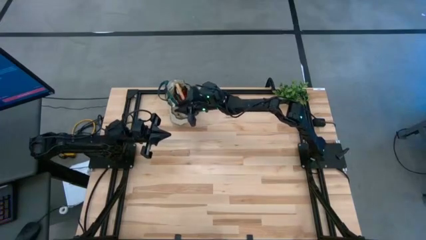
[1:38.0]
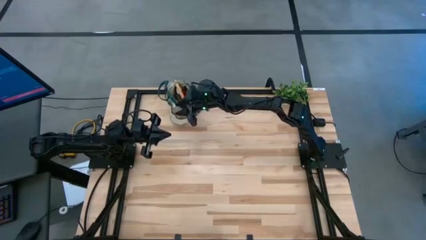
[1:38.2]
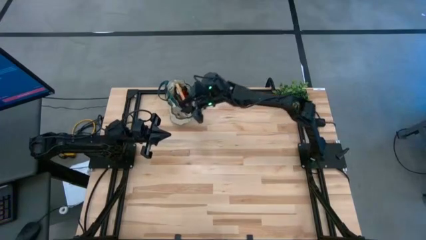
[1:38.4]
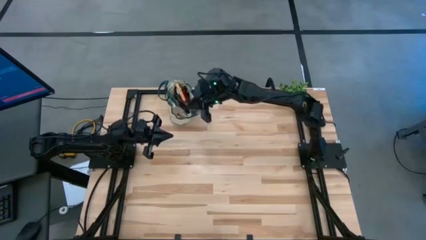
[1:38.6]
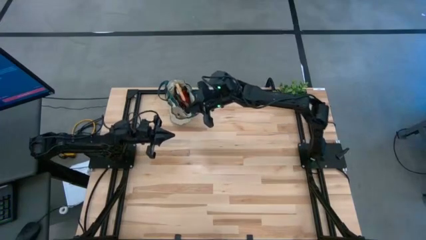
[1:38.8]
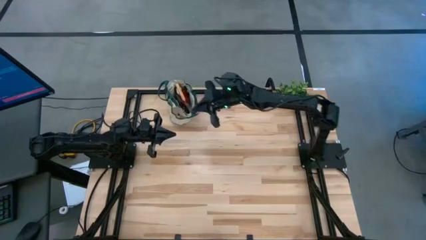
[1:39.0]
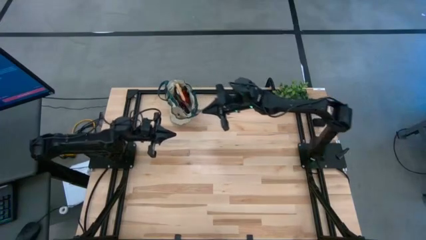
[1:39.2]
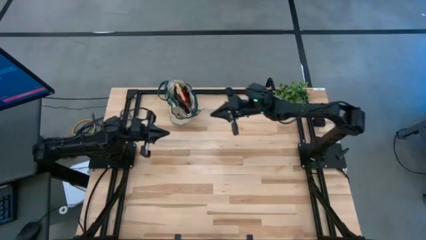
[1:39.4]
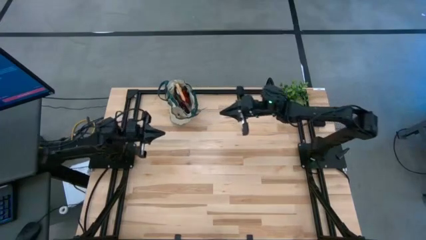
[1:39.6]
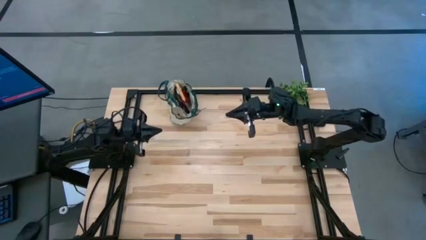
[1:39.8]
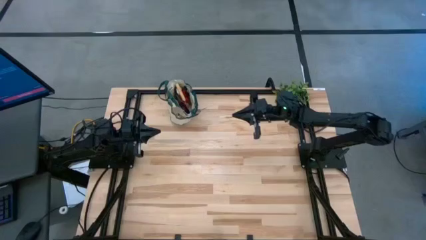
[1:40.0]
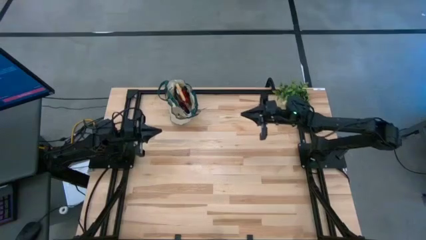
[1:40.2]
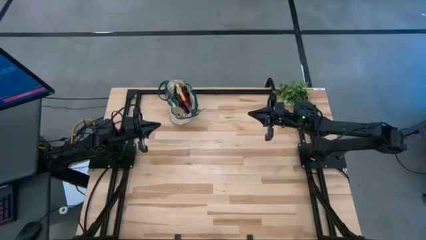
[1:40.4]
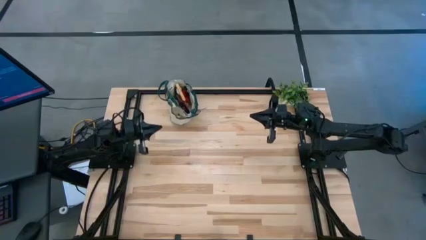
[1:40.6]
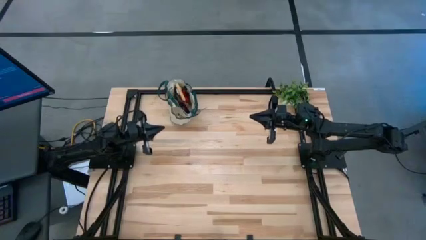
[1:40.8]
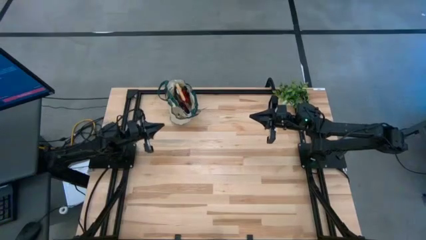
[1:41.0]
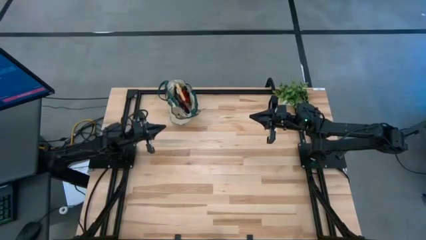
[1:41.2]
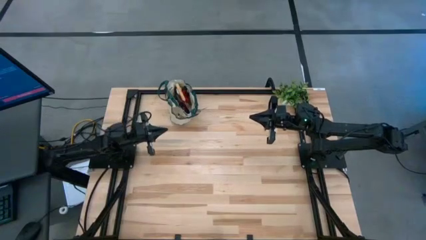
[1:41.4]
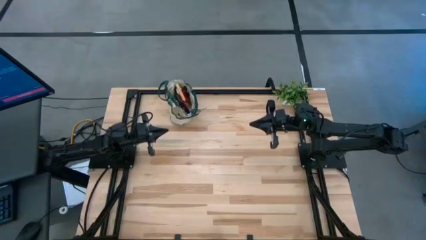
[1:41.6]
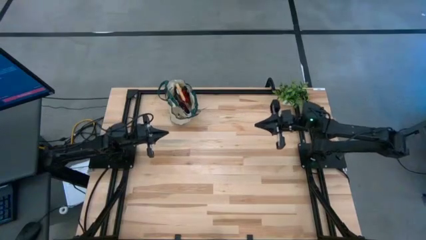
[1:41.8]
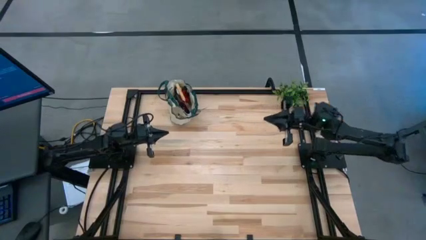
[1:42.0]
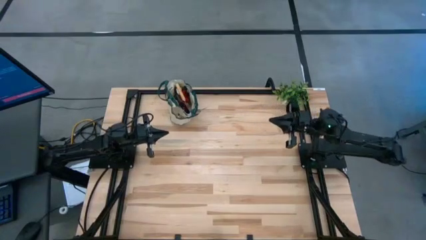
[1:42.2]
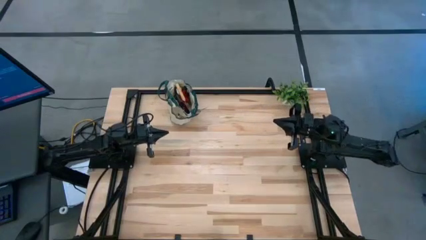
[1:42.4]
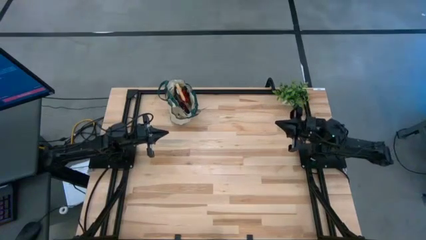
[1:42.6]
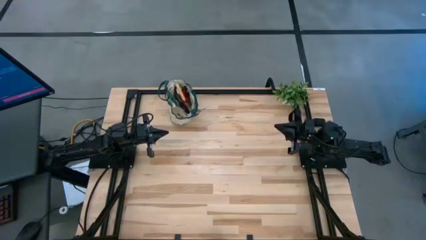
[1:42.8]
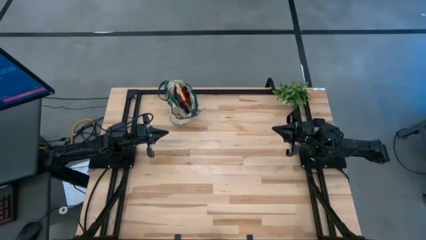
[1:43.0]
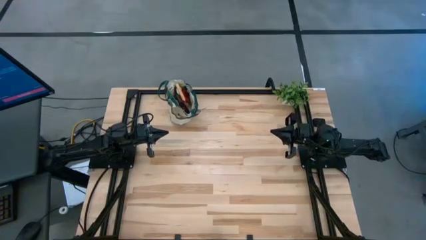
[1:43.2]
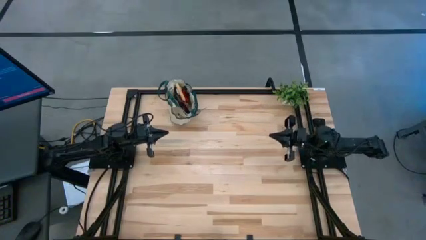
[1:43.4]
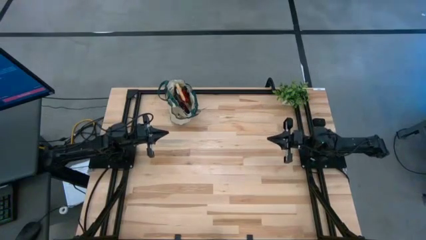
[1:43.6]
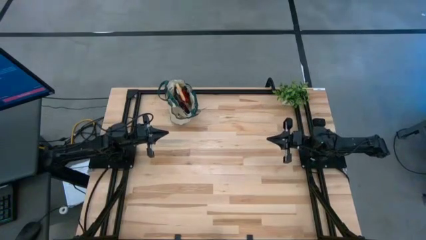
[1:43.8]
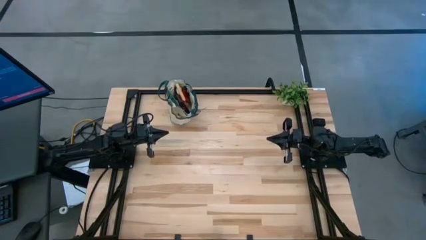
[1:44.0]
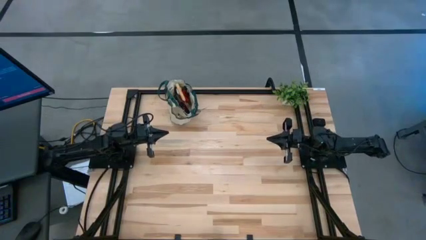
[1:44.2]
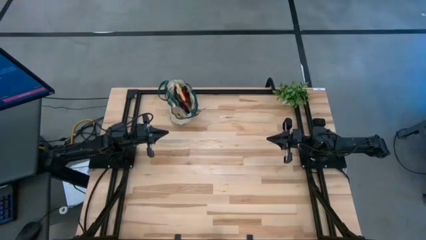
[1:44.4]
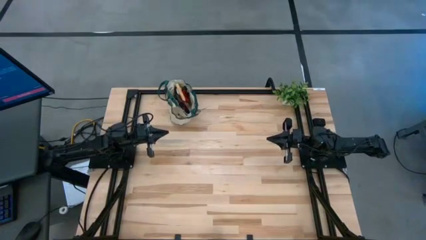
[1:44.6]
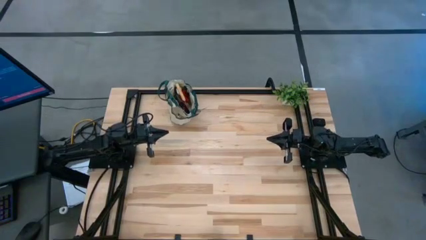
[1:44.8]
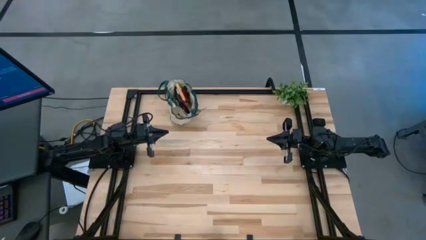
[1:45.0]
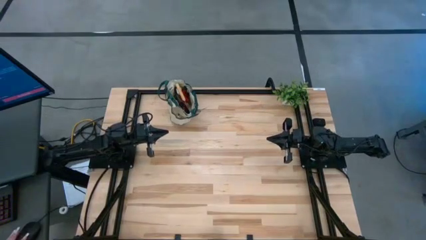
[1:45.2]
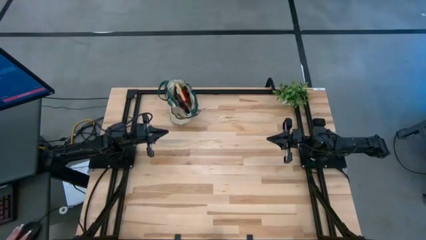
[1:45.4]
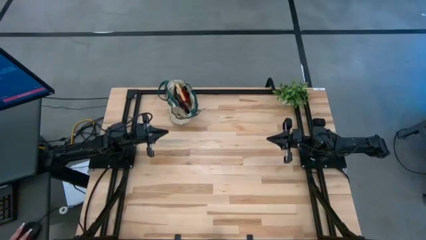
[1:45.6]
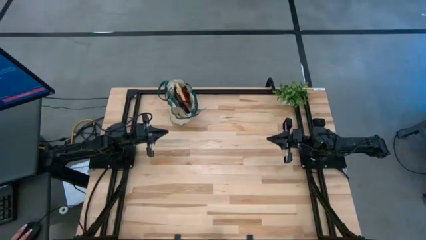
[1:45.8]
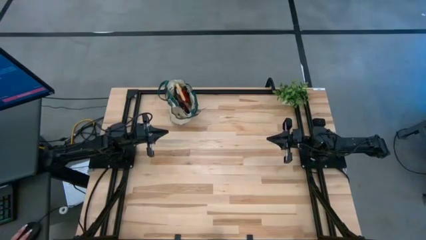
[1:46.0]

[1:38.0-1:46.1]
Task: Pick & Place Garden tools in Gardening bag
Return to Home Position
